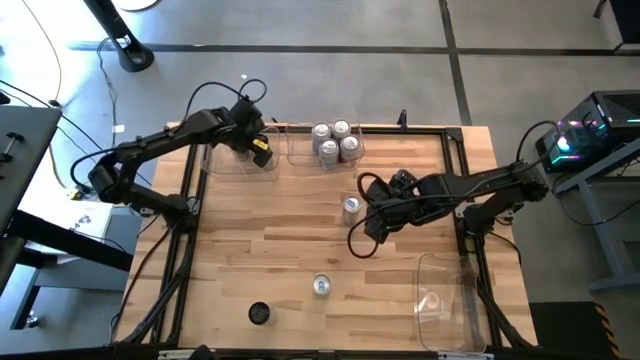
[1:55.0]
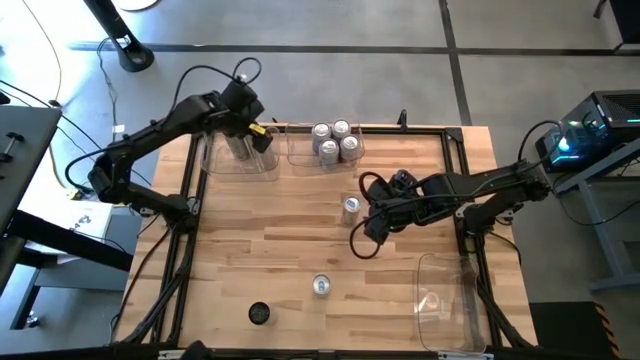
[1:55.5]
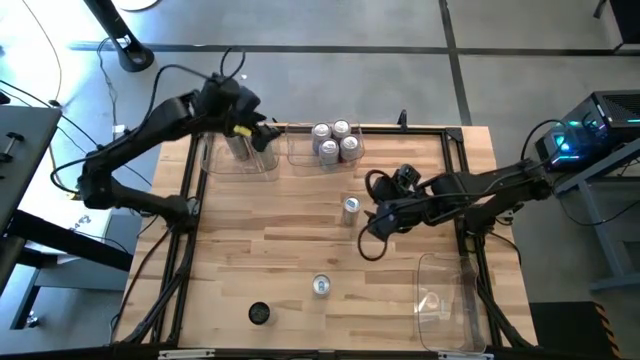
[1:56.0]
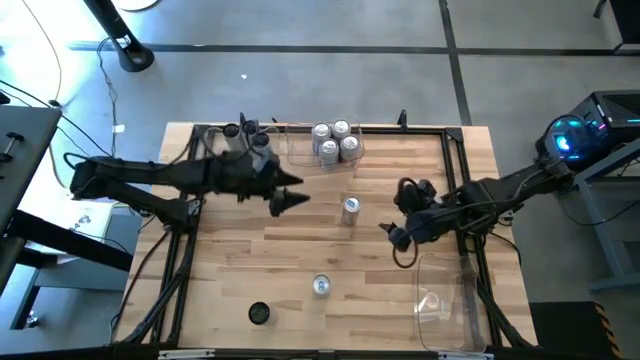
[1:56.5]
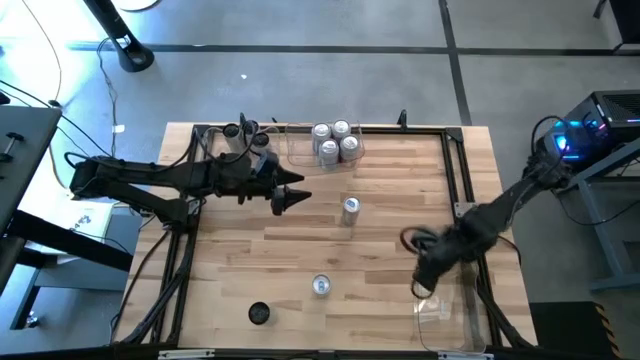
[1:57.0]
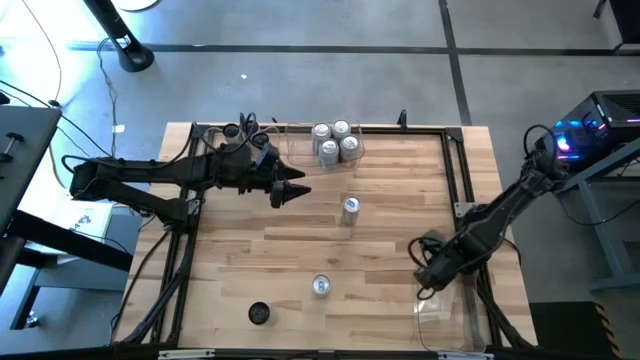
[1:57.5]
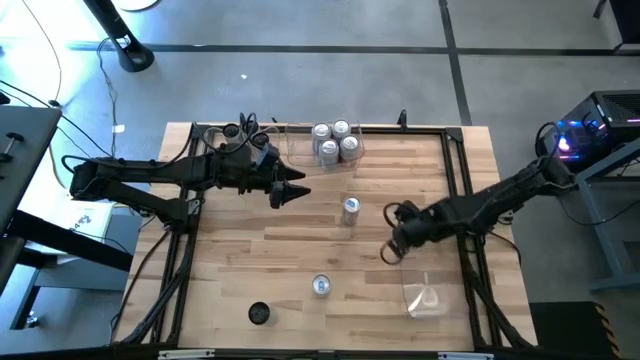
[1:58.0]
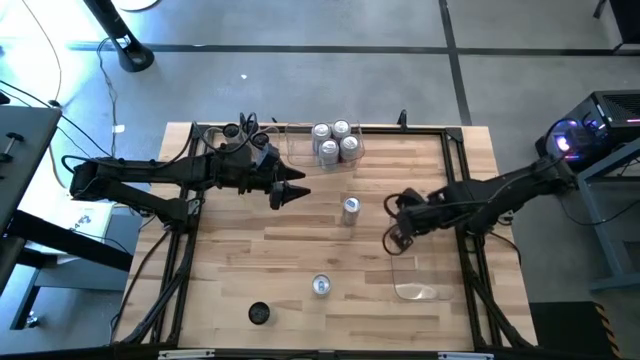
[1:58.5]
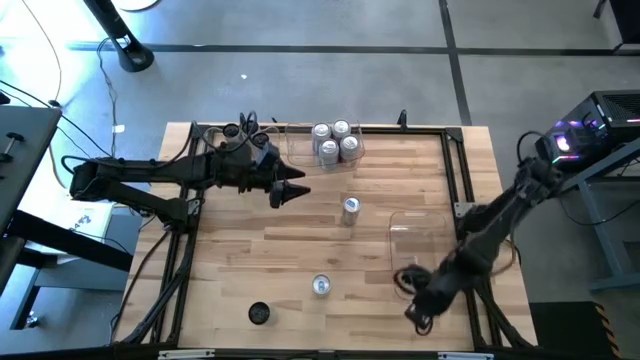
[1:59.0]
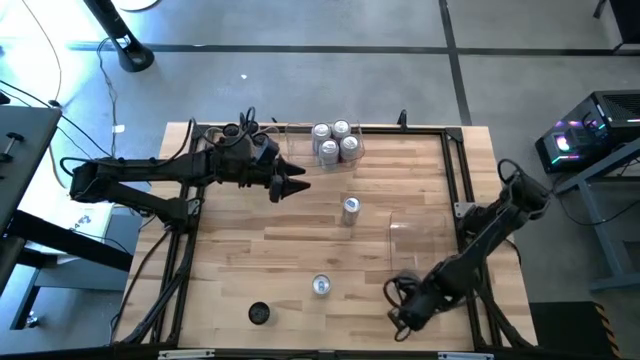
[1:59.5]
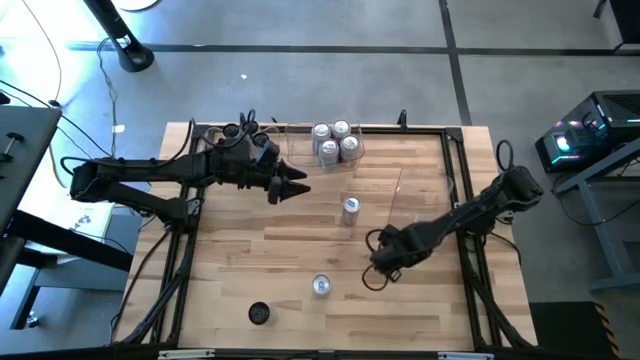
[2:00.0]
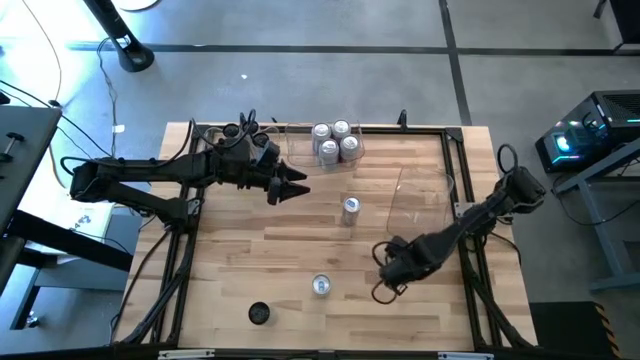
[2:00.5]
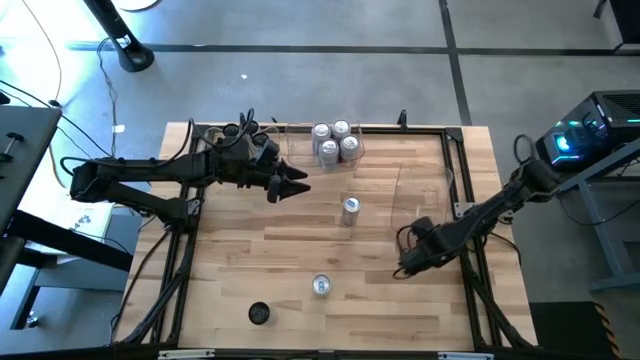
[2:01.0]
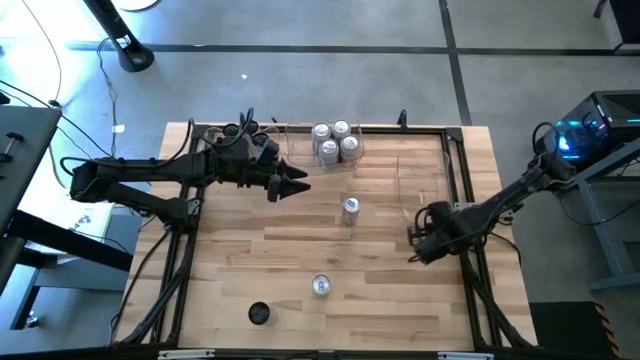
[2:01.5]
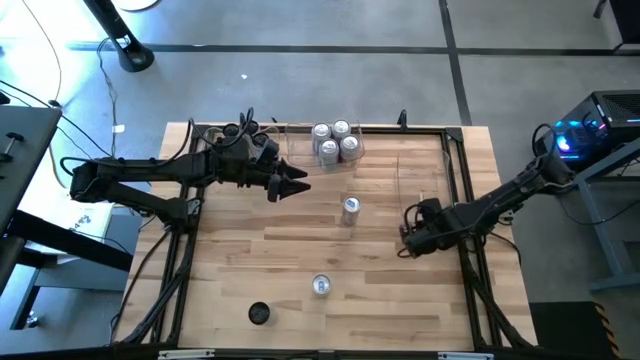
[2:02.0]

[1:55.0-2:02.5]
Task: Sort soda cans
Move the bottom transparent bin to the top right of the table

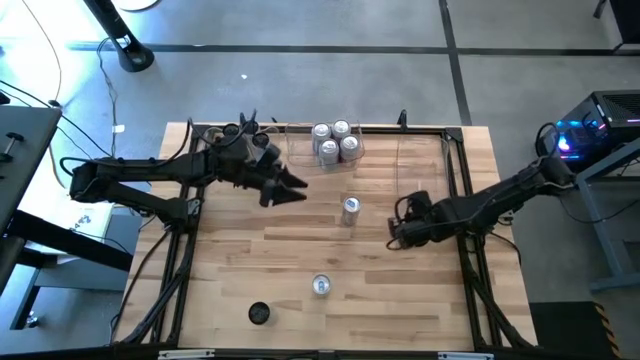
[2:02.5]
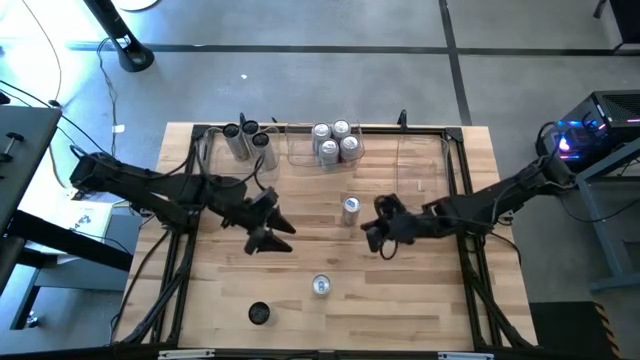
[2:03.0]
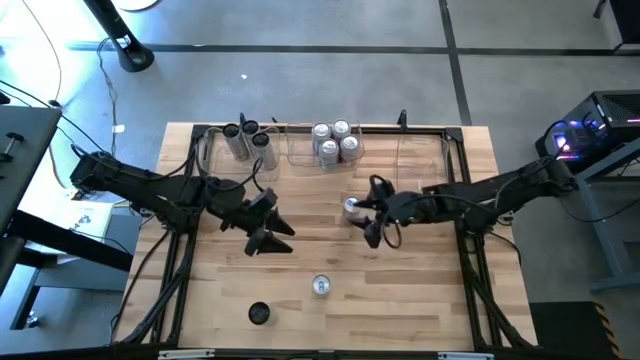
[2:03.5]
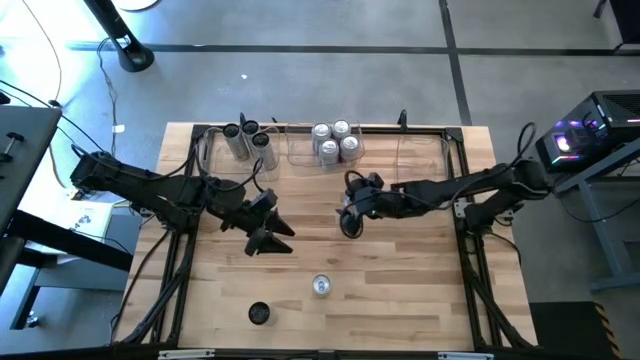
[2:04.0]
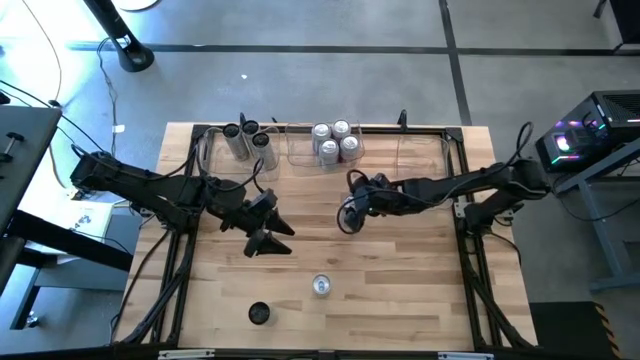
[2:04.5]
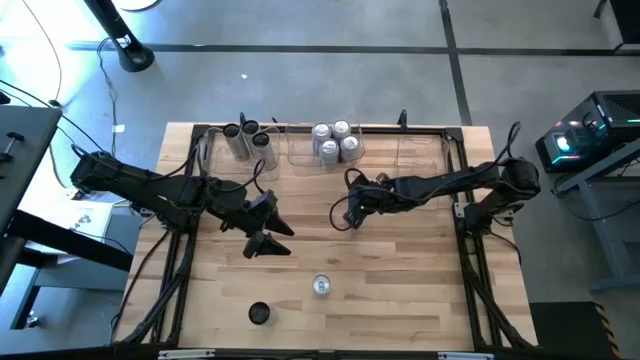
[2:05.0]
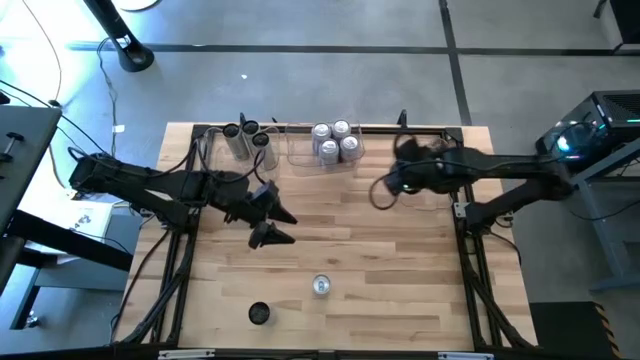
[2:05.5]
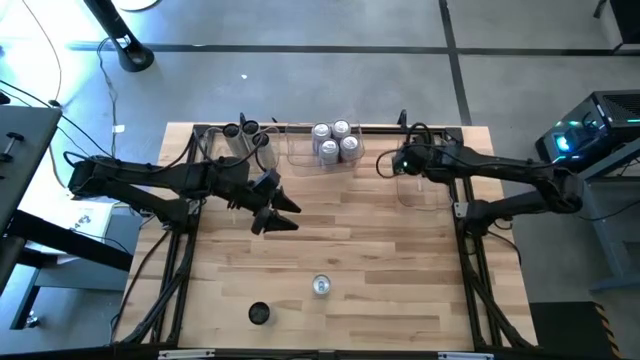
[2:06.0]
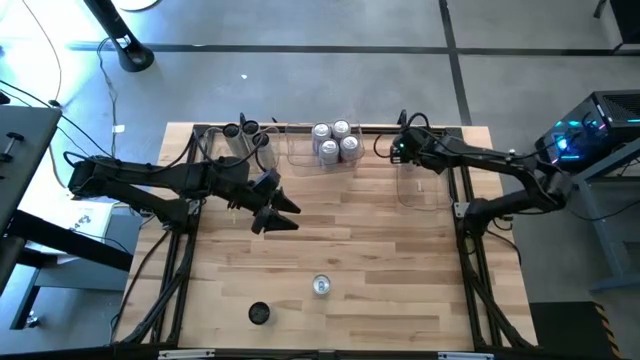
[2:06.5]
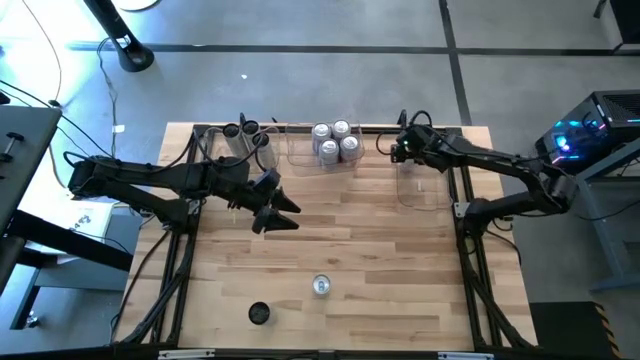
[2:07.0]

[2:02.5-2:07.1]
Put the top blue soda can into the top right transparent bin

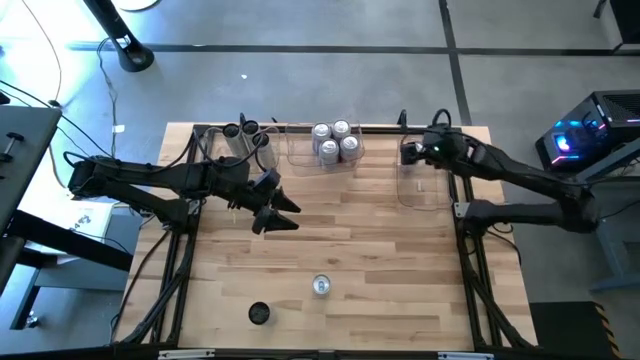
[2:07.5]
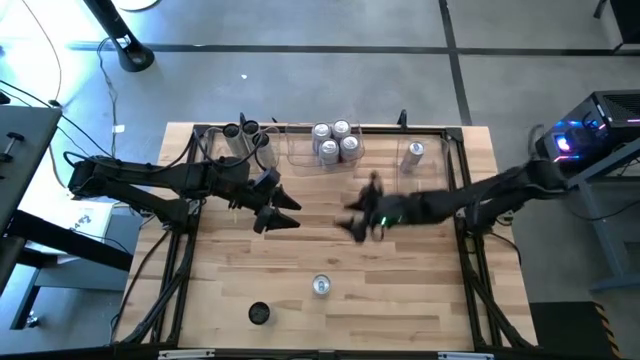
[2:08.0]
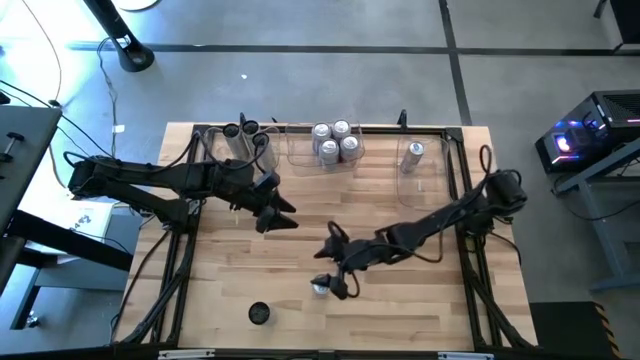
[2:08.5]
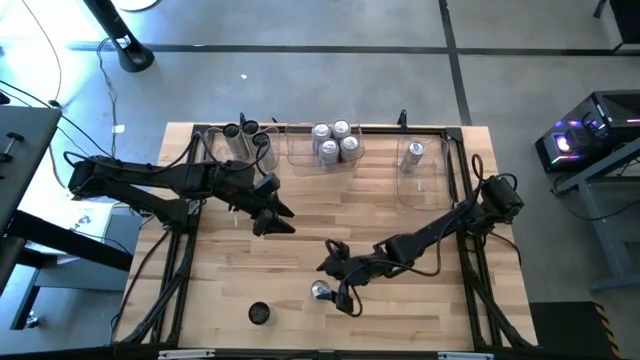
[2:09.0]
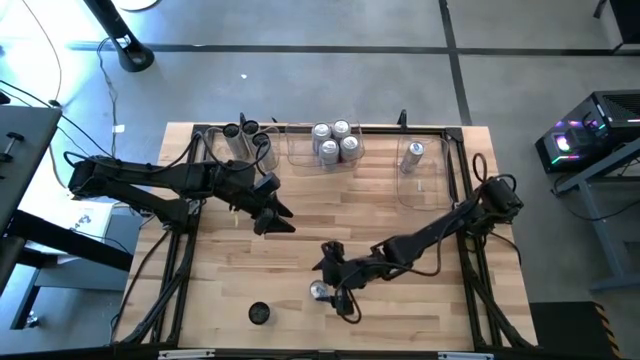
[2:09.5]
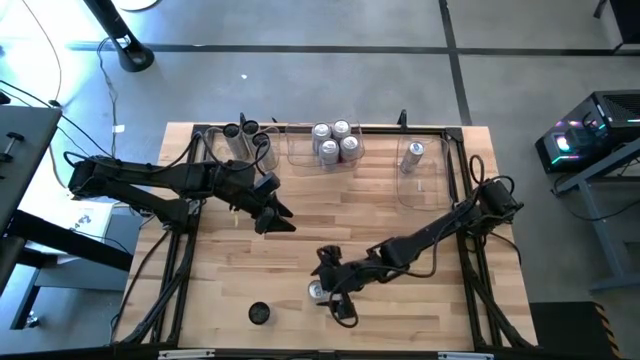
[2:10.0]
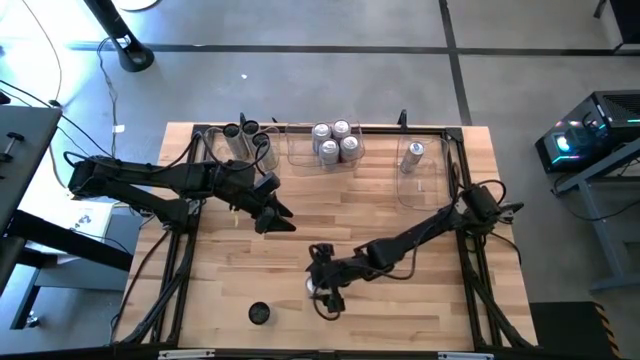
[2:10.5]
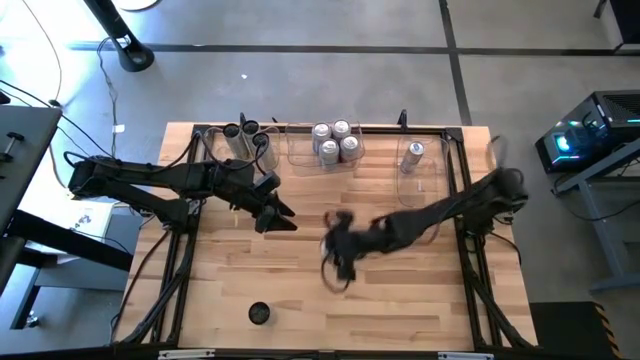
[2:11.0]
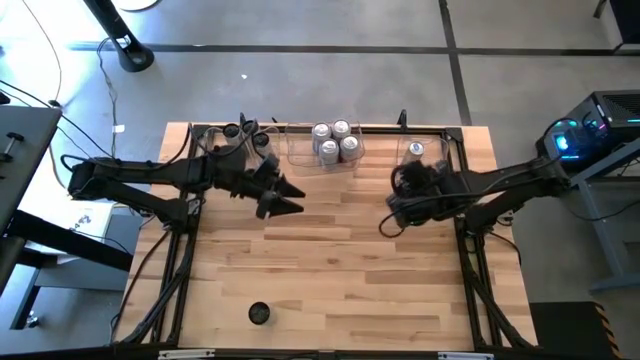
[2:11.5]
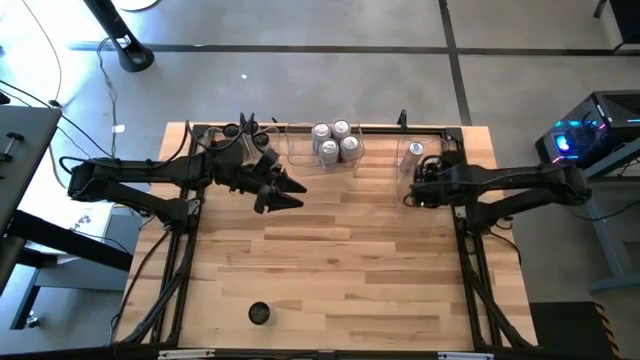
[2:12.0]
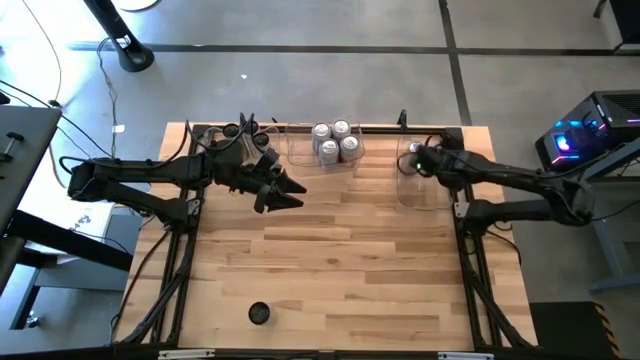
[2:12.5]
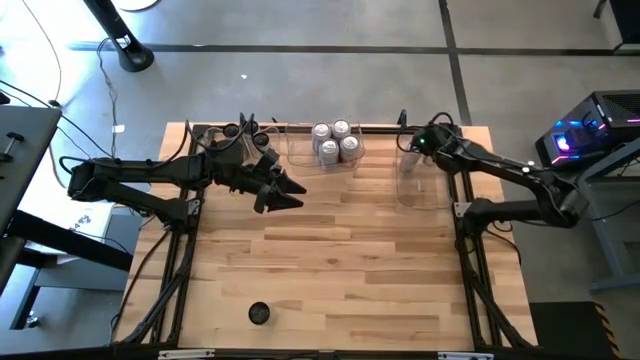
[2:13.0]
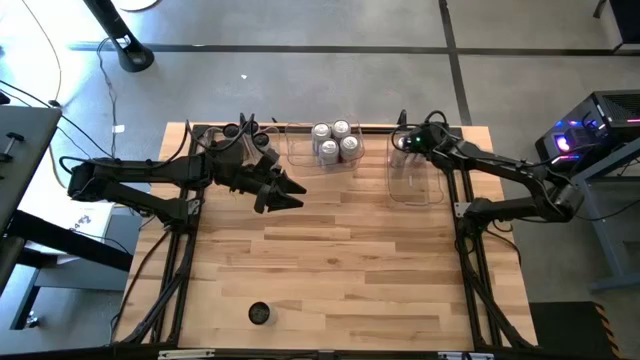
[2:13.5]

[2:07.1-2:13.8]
Put the blue soda can into the top right transparent bin

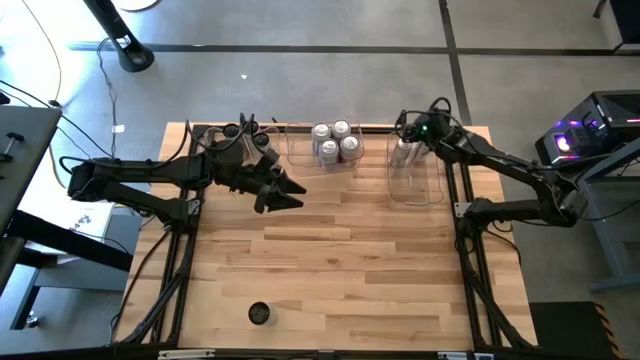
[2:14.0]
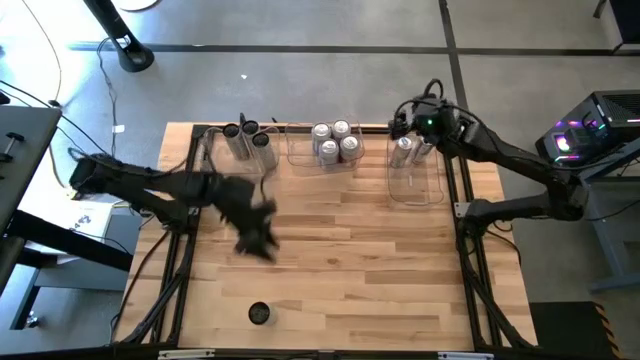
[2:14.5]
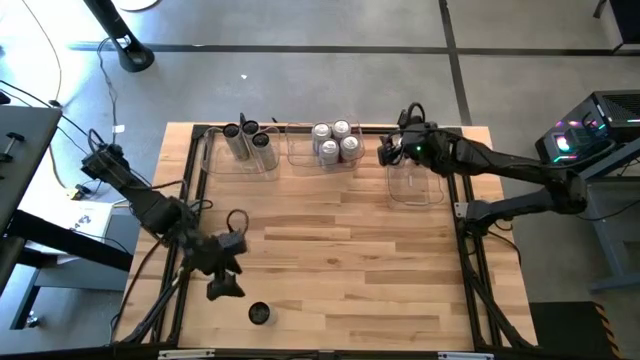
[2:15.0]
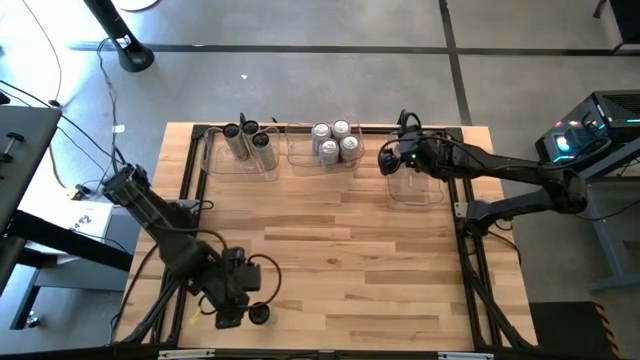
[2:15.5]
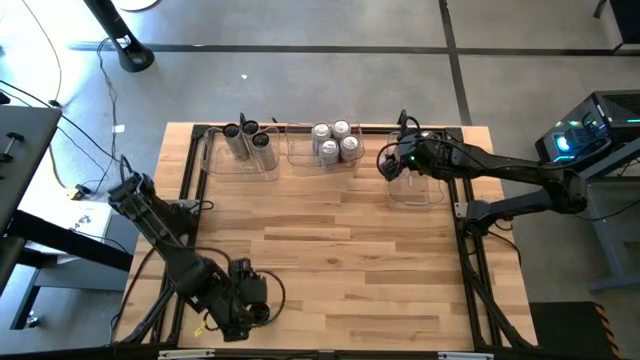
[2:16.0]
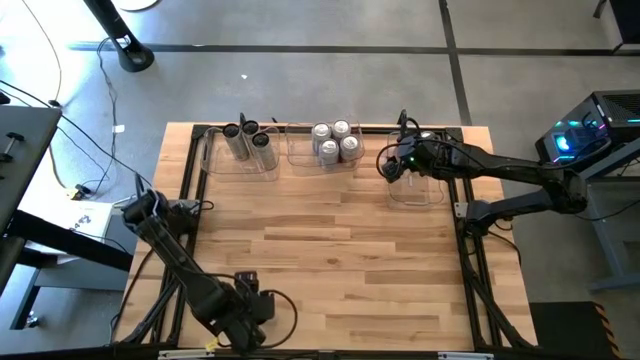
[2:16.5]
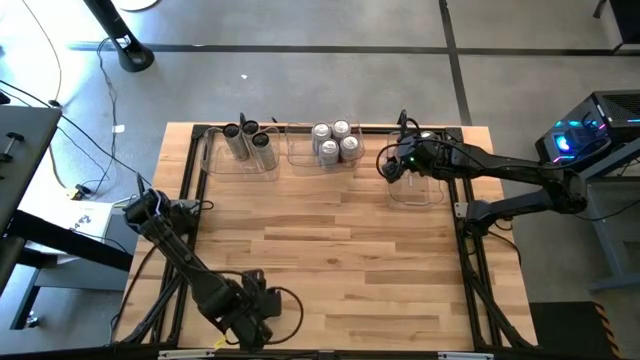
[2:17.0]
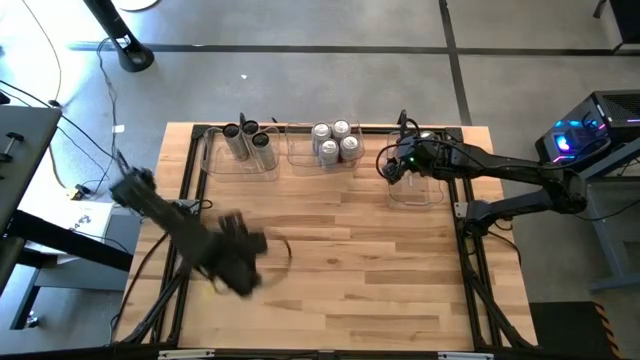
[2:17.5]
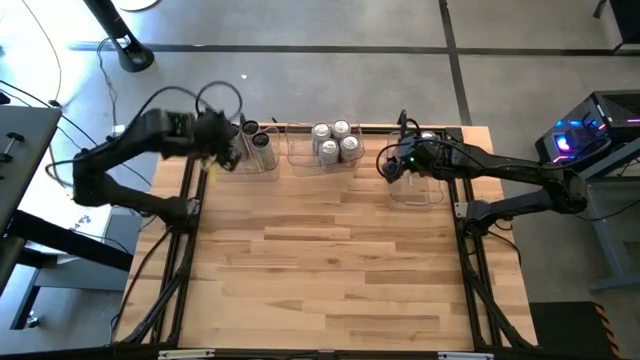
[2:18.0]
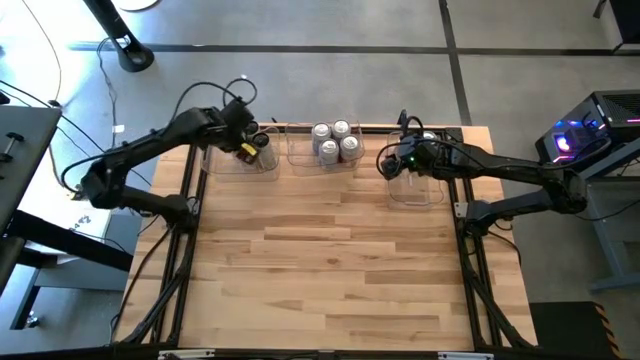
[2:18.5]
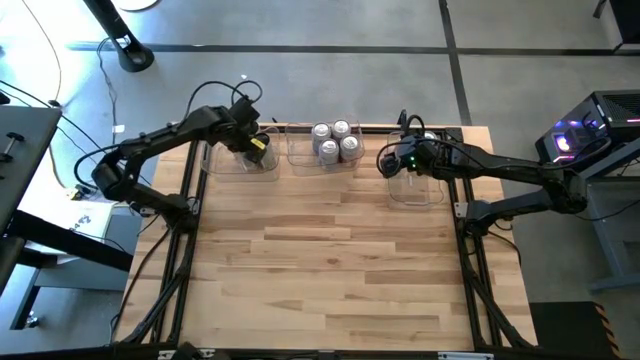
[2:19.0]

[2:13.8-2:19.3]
Put the white-yellow soda can into the top left transparent bin
